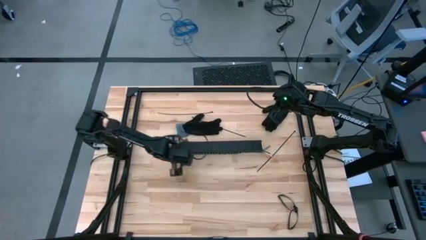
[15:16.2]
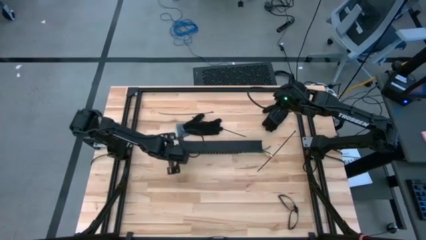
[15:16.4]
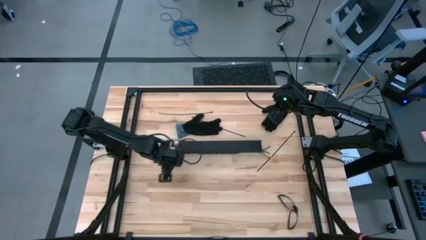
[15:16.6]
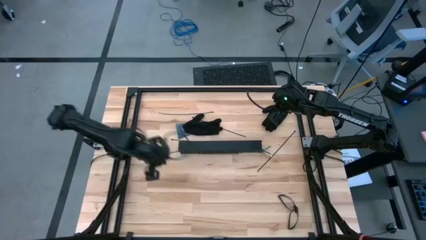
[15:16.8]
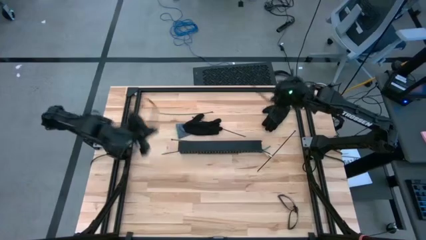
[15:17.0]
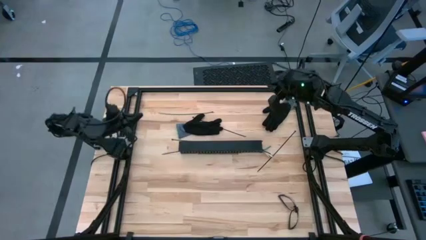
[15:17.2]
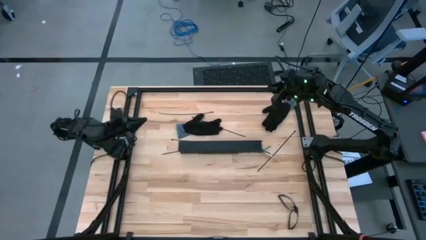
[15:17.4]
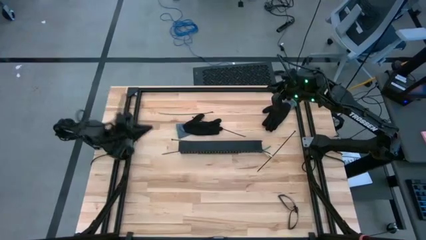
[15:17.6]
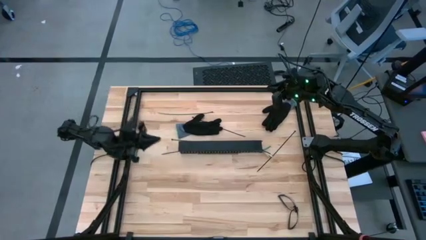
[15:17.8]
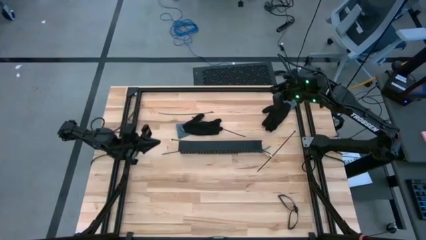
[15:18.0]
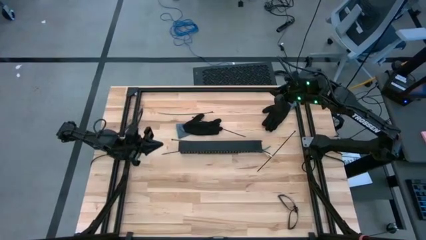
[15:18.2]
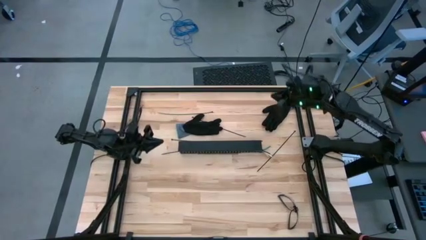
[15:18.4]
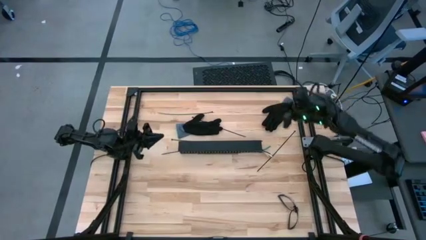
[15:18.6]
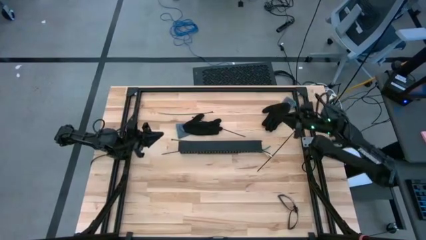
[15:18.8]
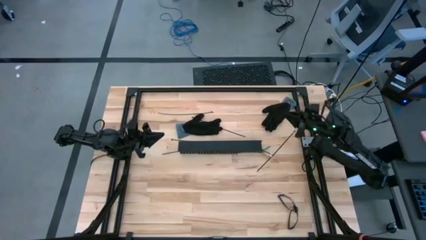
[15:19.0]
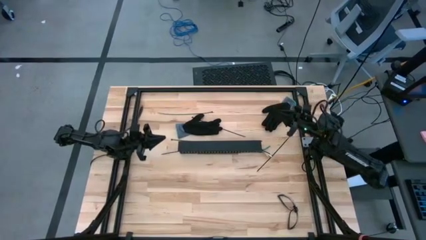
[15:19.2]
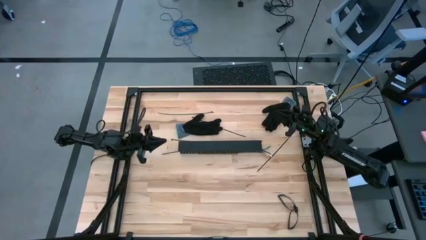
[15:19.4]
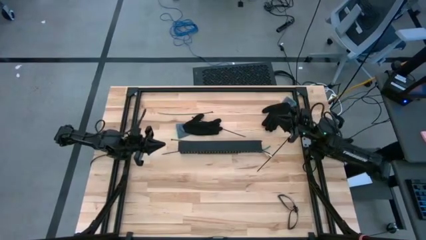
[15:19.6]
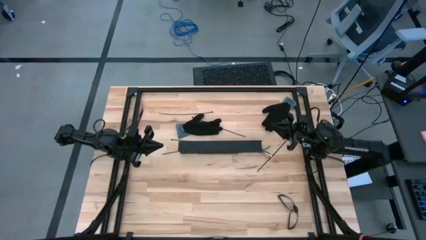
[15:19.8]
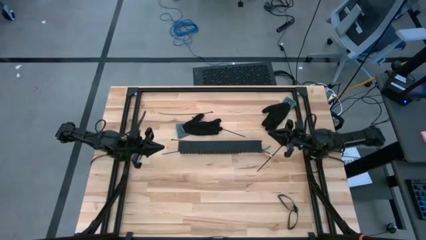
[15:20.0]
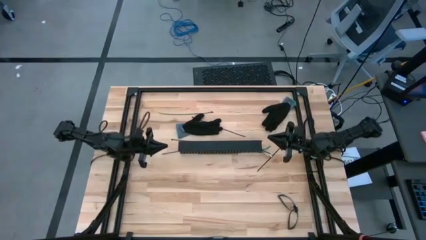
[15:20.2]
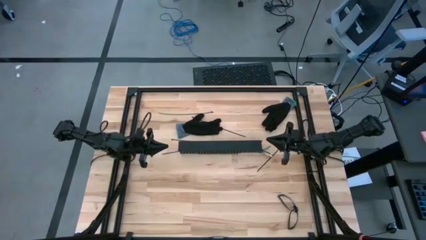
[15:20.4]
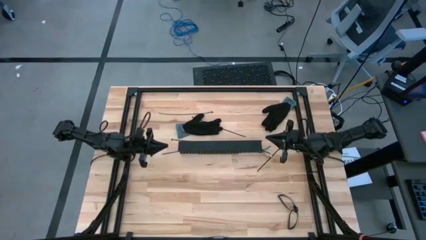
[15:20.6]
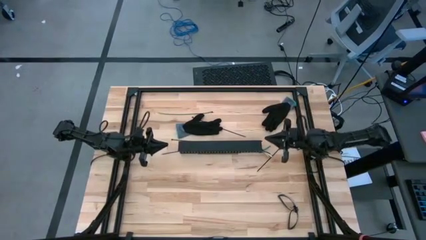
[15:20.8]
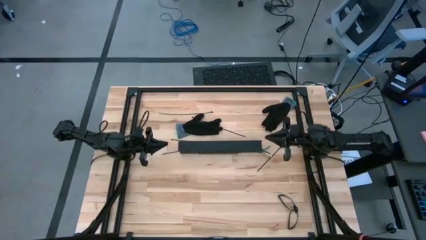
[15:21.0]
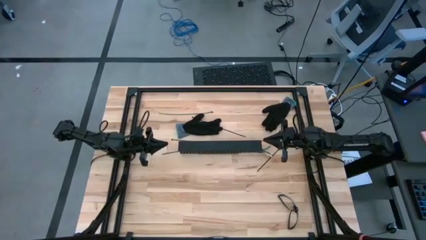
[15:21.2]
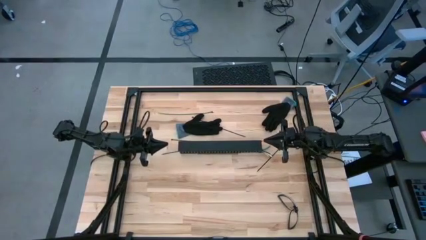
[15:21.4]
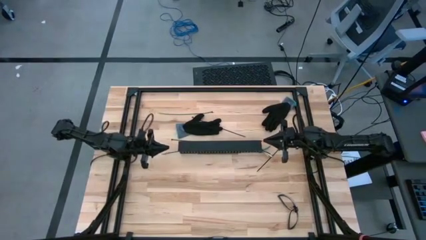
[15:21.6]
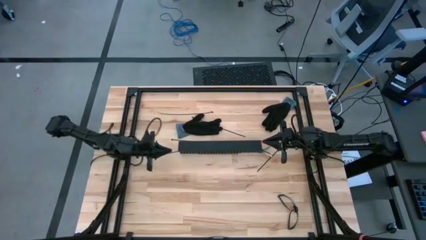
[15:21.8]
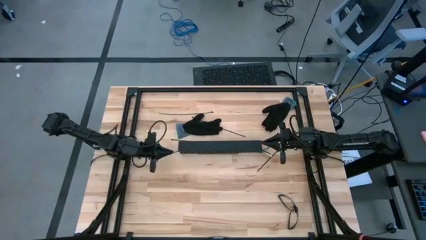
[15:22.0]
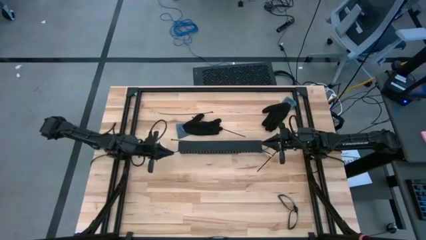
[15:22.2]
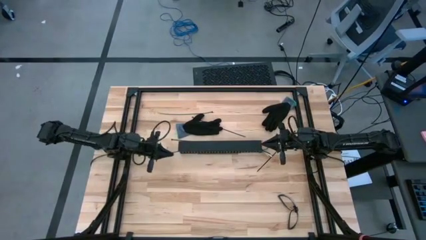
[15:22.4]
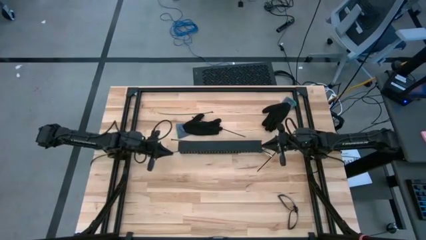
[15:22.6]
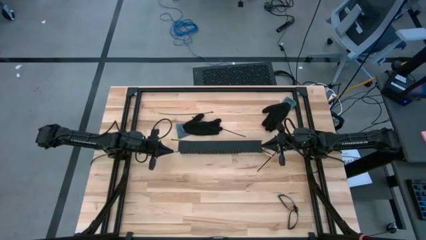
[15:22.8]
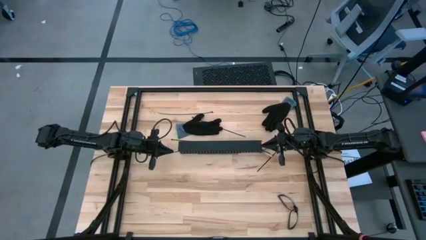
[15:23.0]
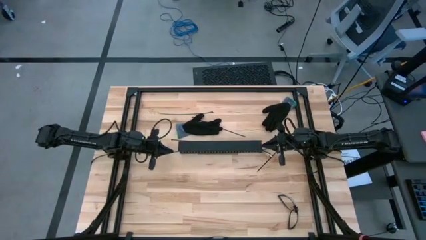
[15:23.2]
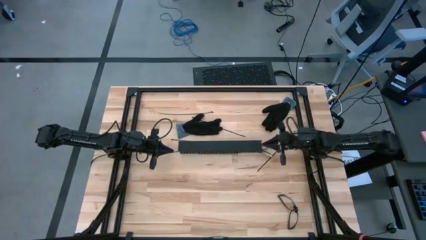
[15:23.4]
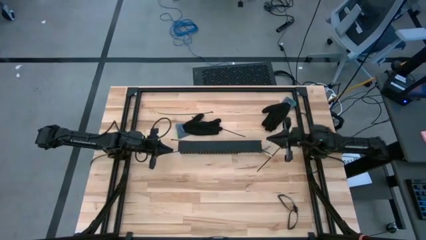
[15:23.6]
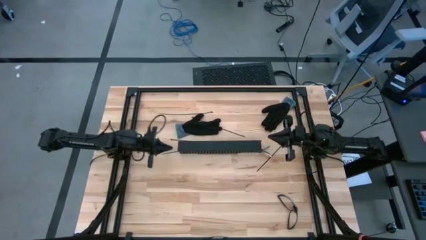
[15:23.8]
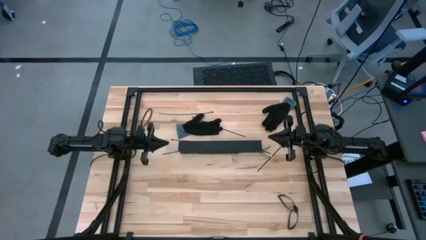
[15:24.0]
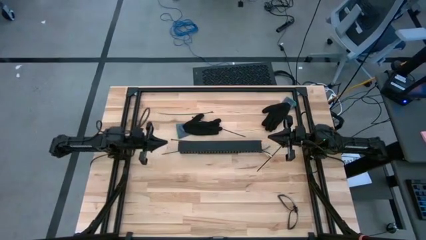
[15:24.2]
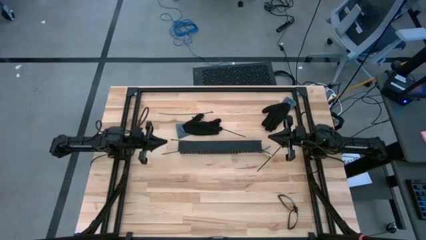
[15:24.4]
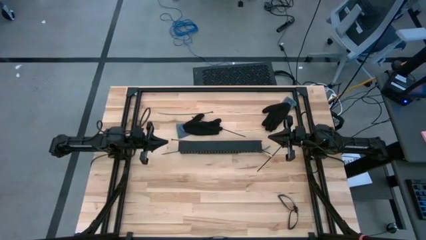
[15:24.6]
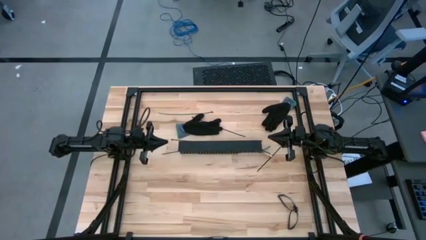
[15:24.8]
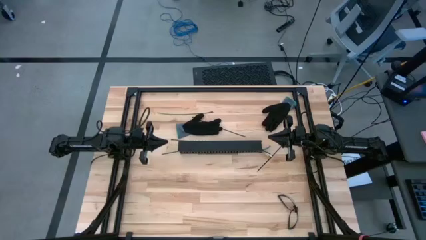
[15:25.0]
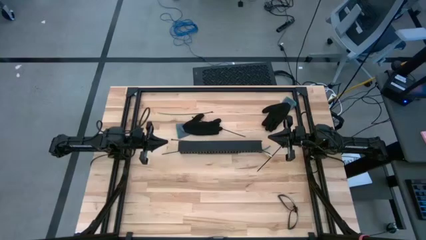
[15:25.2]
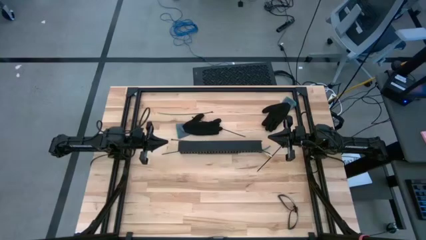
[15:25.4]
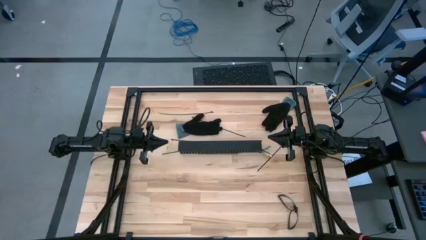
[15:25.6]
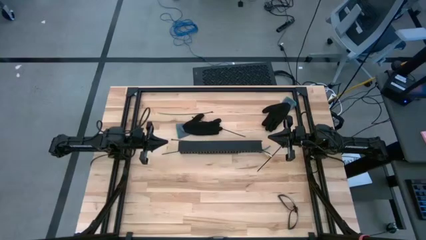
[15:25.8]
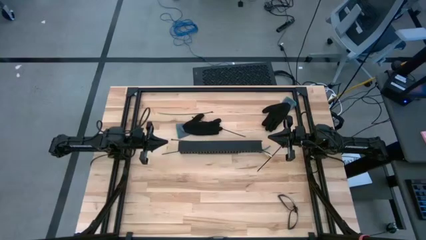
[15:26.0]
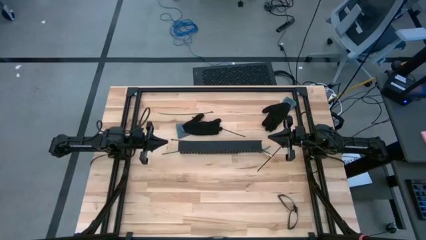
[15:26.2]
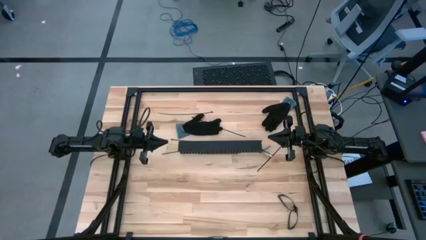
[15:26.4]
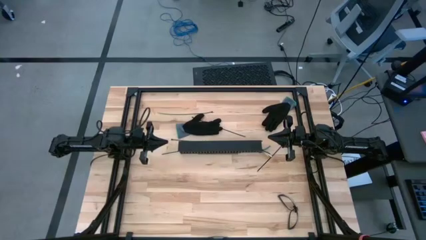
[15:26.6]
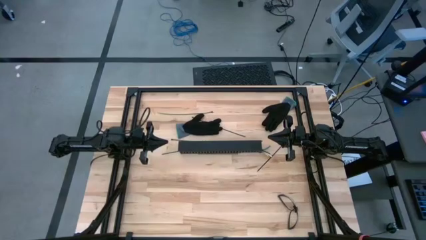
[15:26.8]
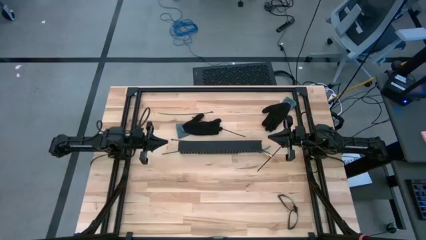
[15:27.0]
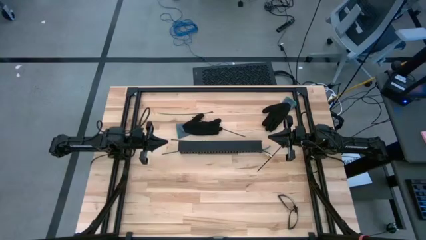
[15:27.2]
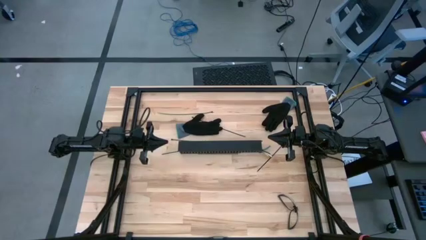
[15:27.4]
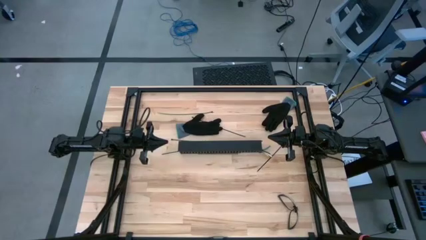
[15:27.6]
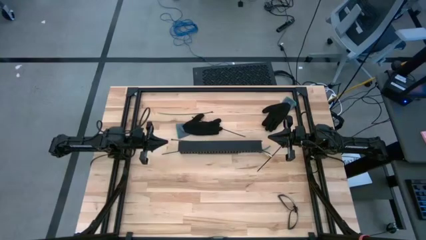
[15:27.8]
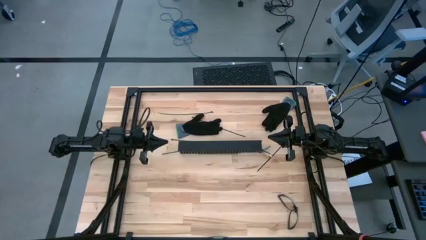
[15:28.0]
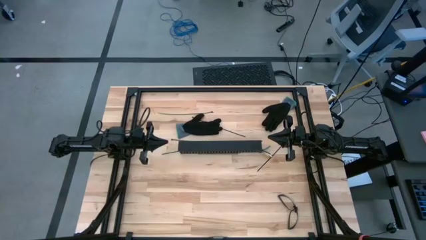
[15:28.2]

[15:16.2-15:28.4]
Task: Ziptie cables
Return to Home Position
